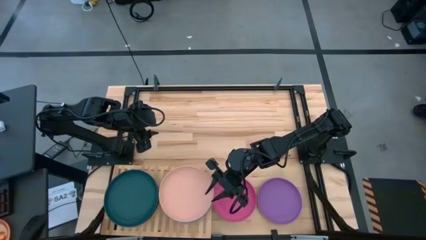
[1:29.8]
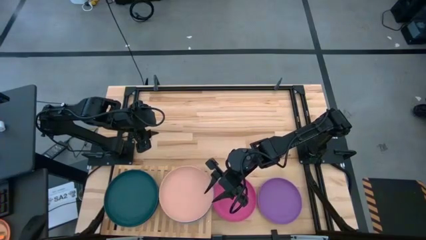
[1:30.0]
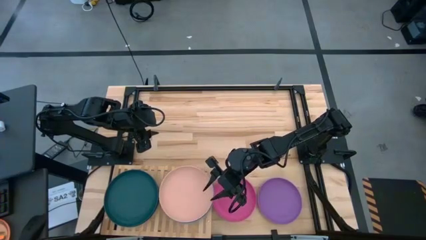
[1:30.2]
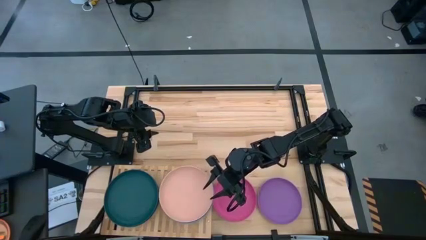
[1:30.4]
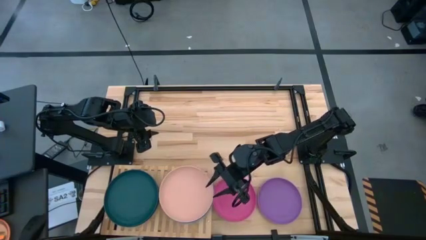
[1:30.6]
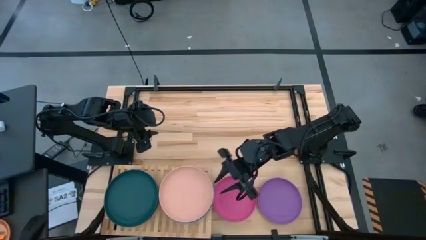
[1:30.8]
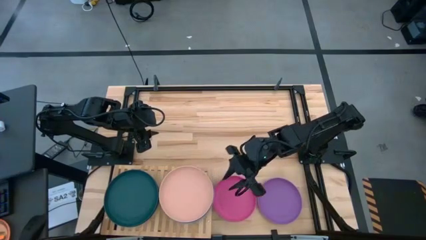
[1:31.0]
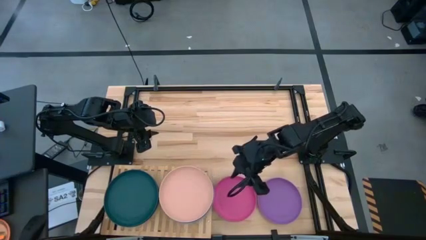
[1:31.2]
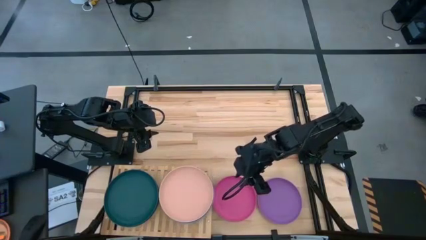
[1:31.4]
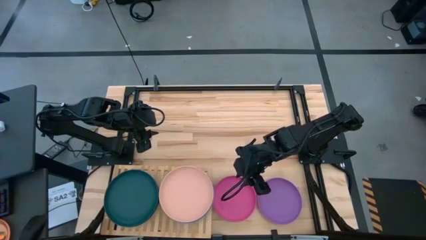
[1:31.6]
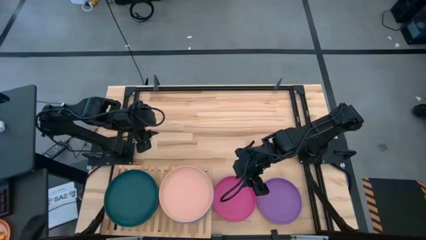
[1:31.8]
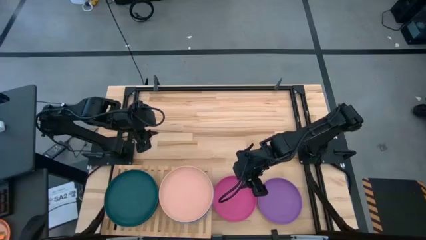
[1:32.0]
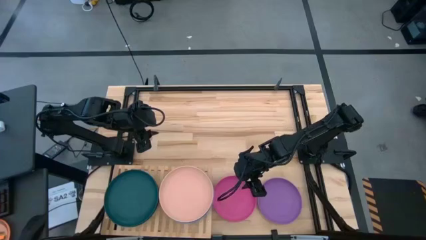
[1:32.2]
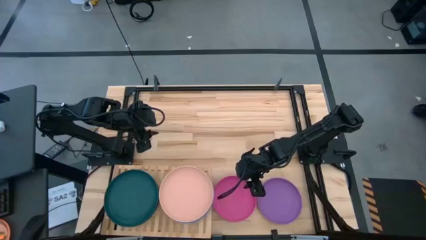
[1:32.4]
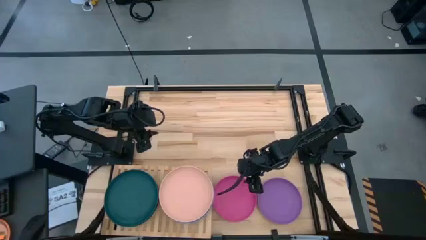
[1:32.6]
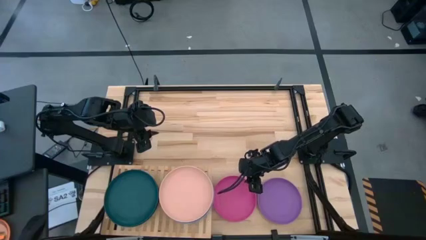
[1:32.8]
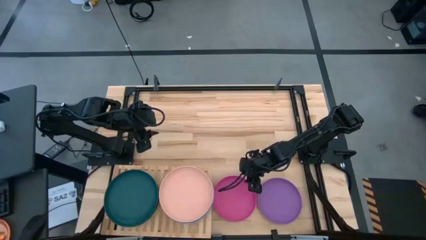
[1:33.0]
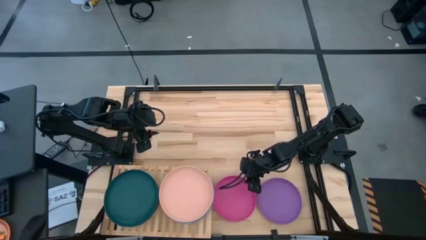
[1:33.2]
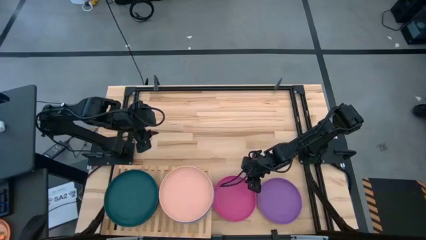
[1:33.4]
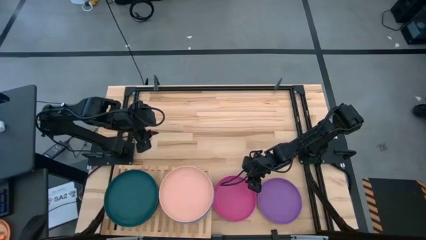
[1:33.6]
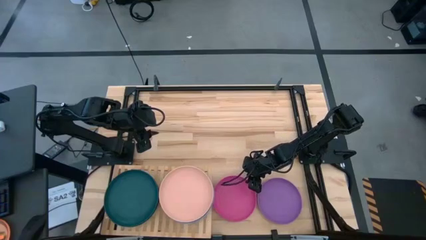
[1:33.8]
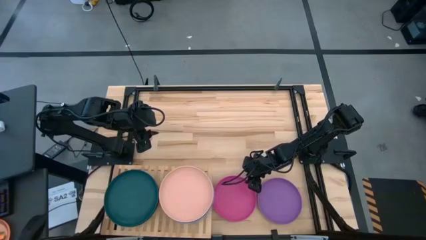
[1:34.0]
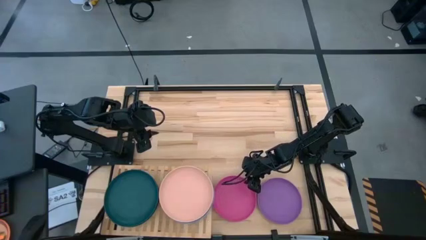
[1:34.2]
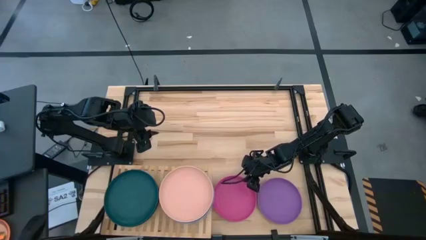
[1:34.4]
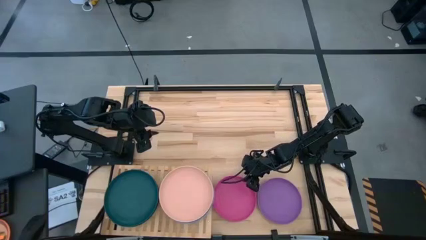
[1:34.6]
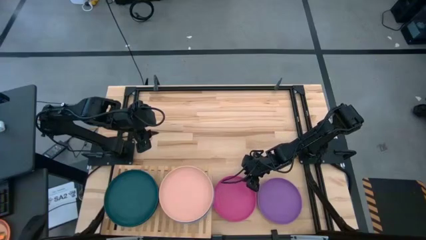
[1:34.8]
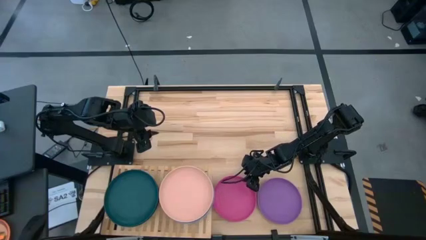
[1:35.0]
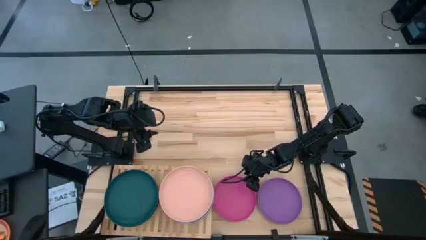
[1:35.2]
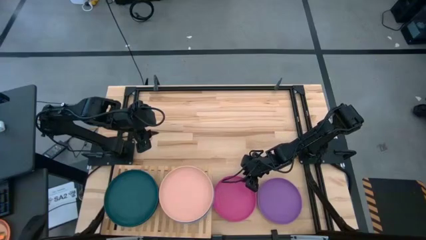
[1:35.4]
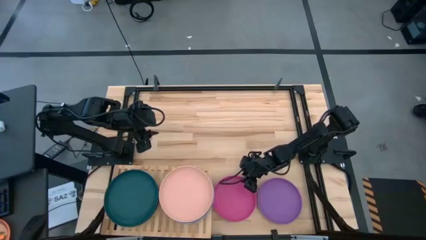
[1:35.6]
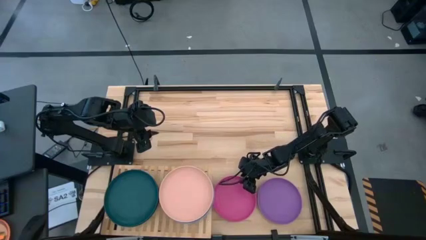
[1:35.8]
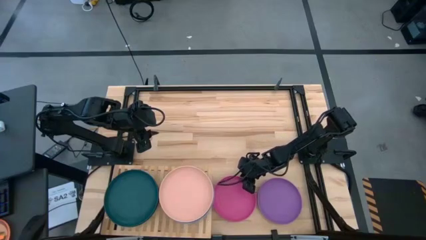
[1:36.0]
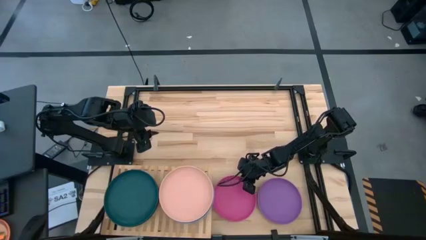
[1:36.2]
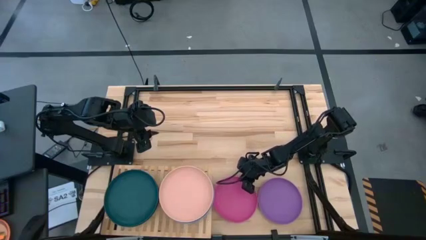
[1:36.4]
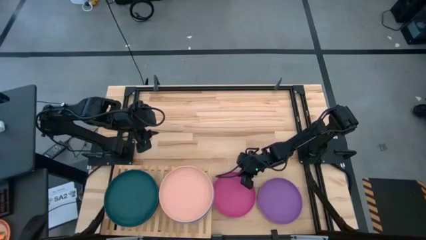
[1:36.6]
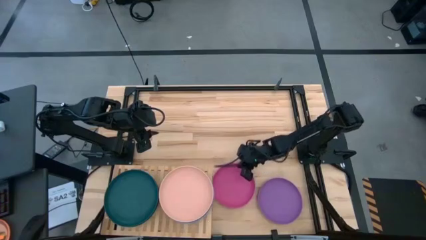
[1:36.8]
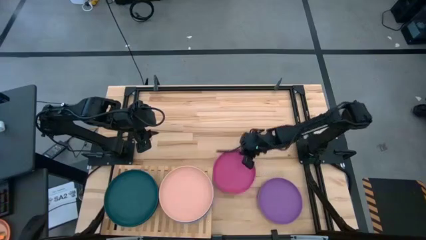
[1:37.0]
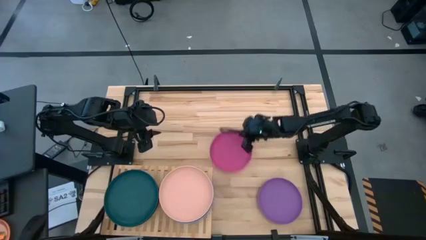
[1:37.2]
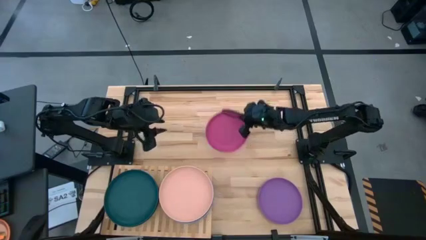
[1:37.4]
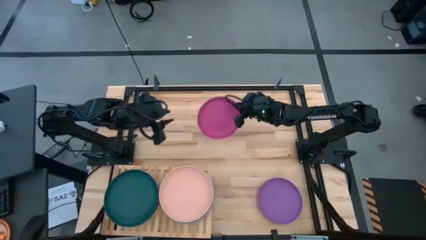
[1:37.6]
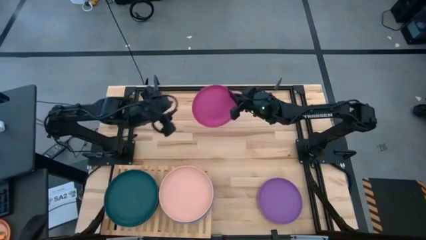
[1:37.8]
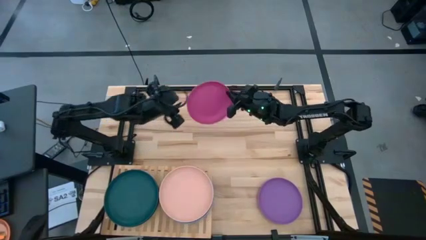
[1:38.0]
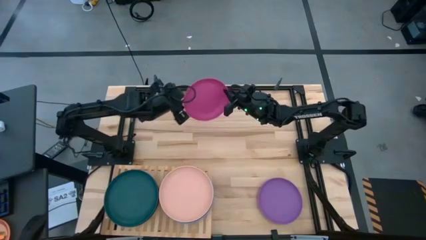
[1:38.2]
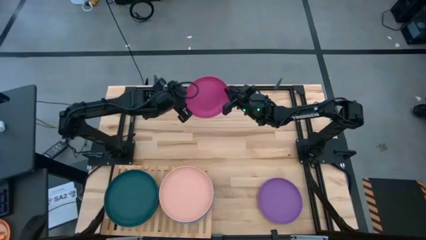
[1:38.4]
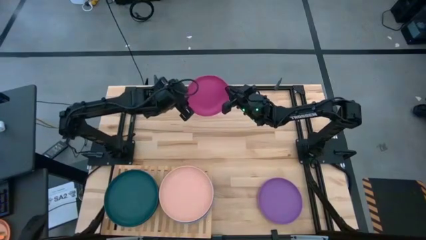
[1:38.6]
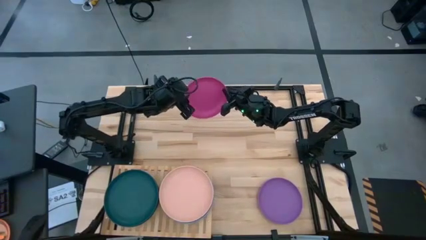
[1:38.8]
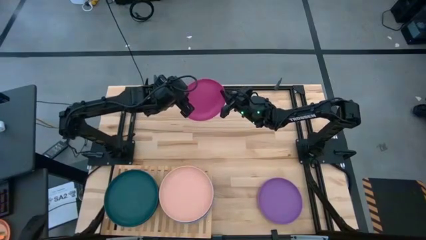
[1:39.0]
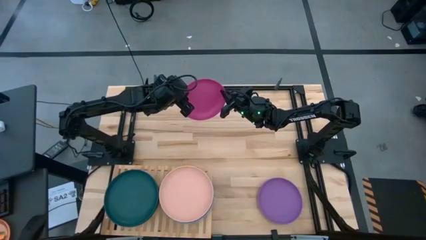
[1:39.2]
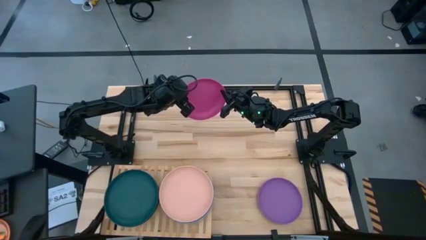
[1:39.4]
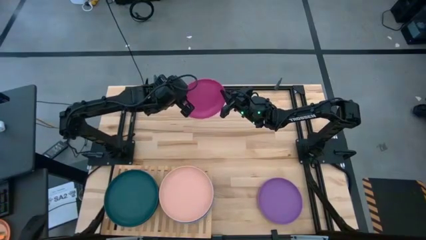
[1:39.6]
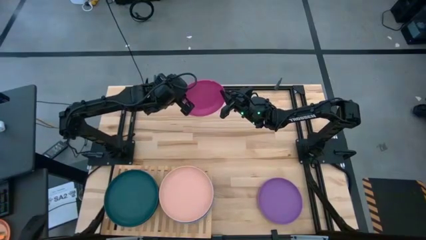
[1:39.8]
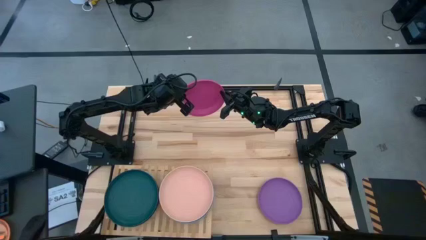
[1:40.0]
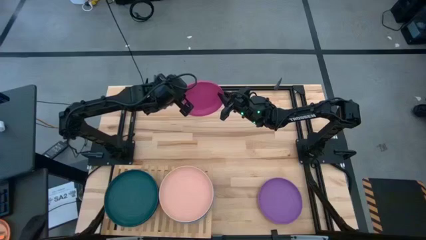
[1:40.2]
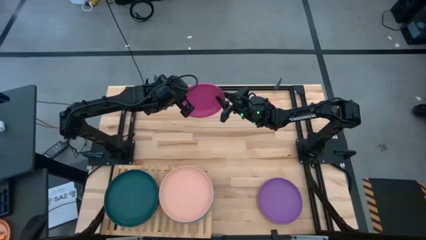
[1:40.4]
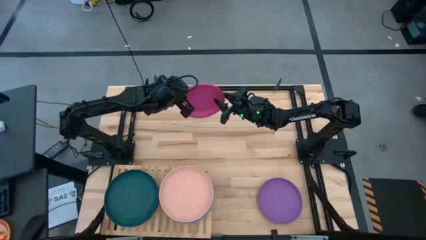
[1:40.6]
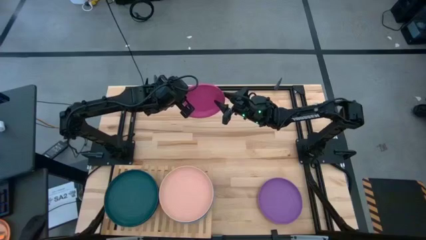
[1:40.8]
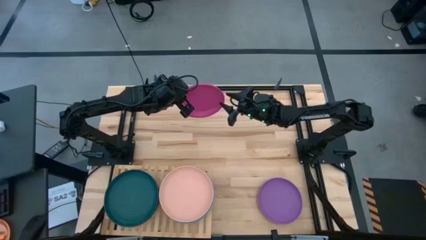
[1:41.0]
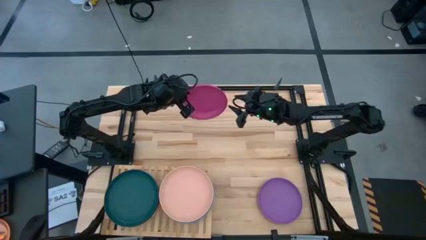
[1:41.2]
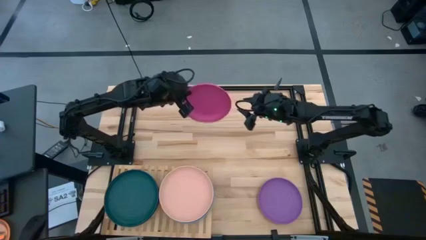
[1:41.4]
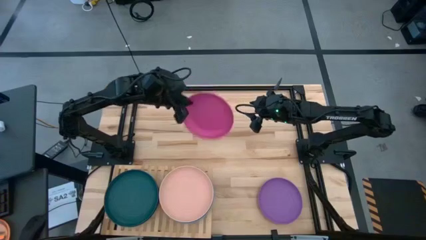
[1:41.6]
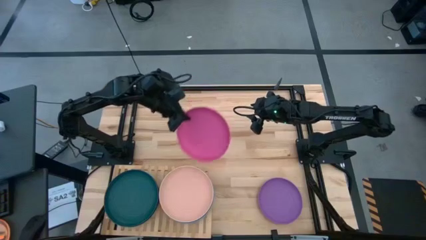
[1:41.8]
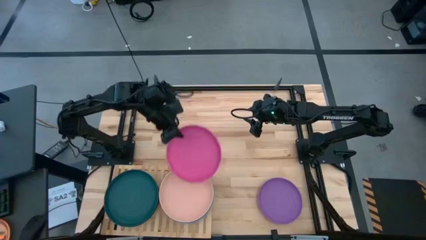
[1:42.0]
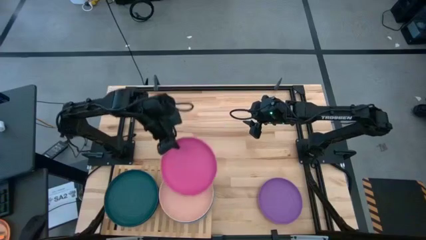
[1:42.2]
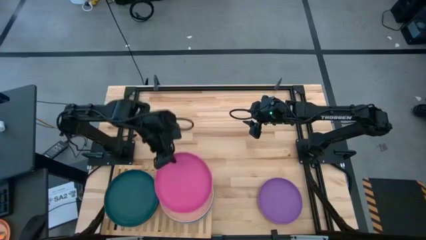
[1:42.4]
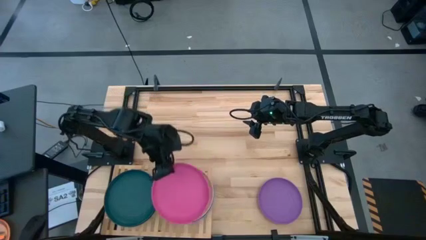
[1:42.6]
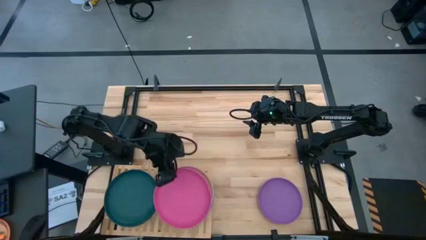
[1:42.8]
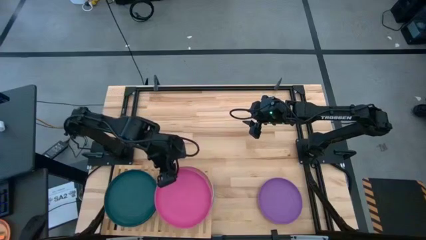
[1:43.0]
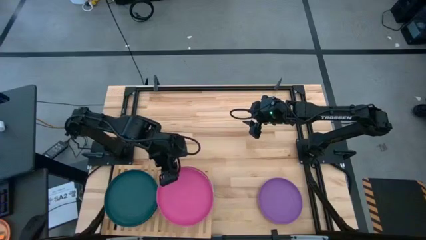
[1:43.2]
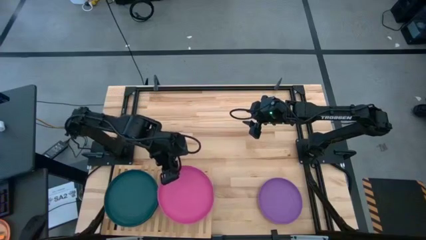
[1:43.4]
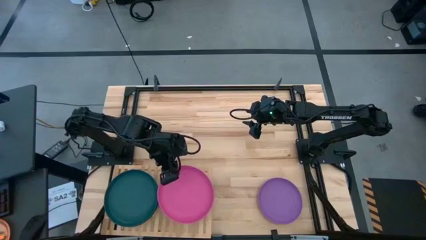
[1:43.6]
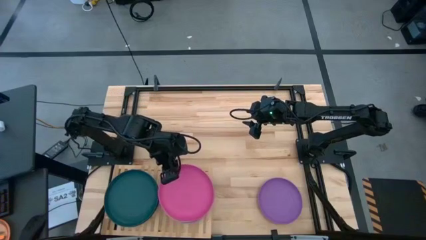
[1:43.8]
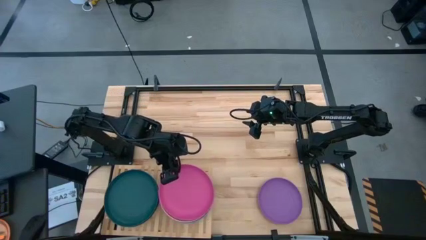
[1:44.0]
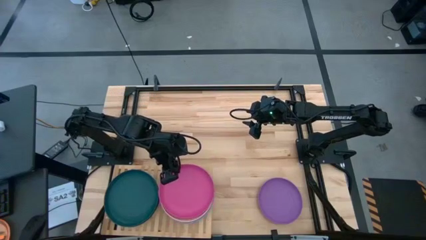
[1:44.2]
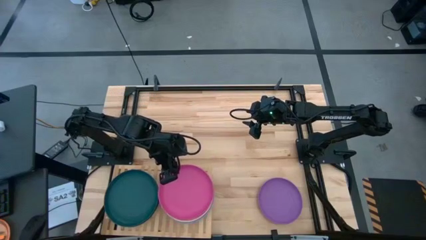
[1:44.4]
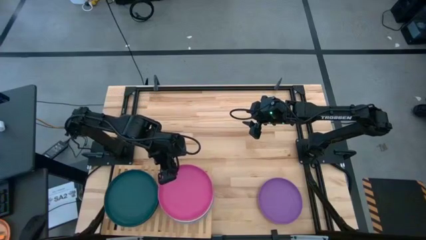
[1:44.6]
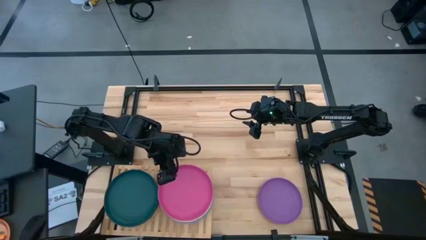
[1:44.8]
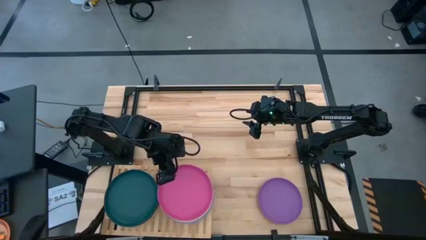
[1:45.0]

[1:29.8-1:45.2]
Task: Place and stack plates onto a shelf
Stack the pink plate on top of the light orange plate on the shelf
